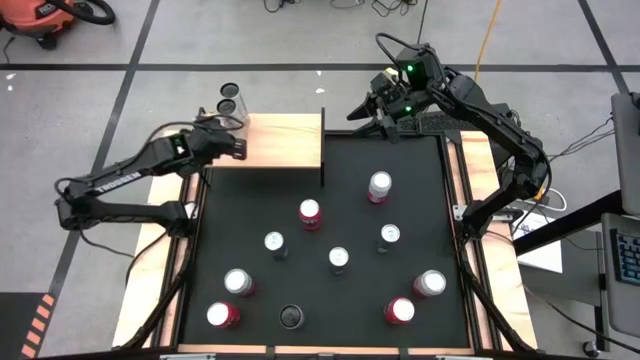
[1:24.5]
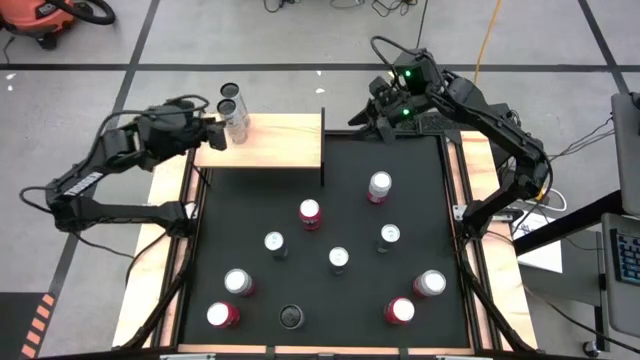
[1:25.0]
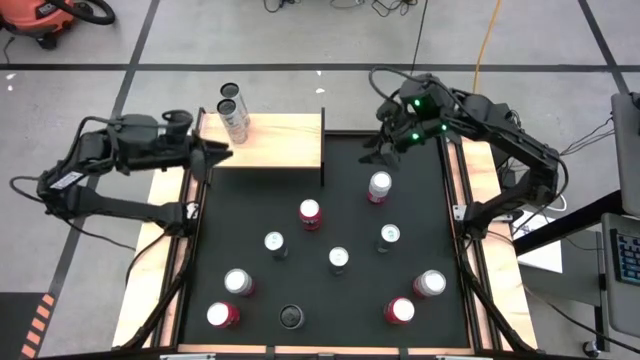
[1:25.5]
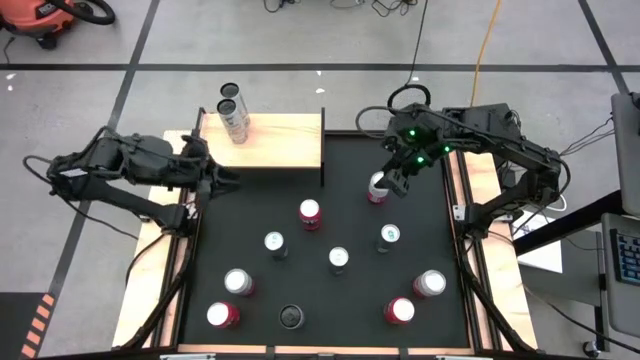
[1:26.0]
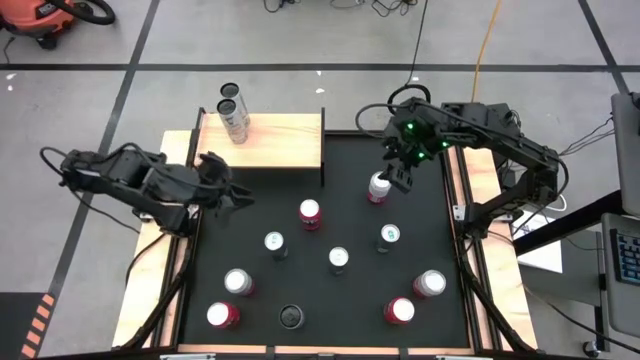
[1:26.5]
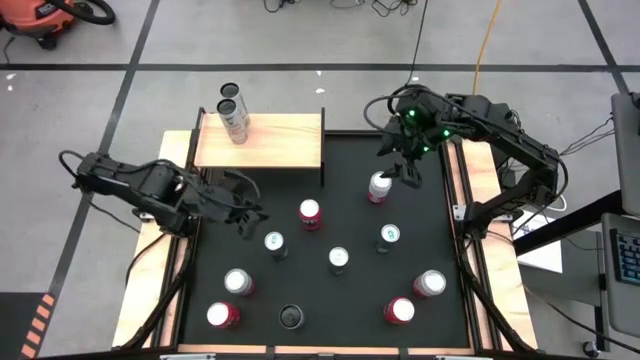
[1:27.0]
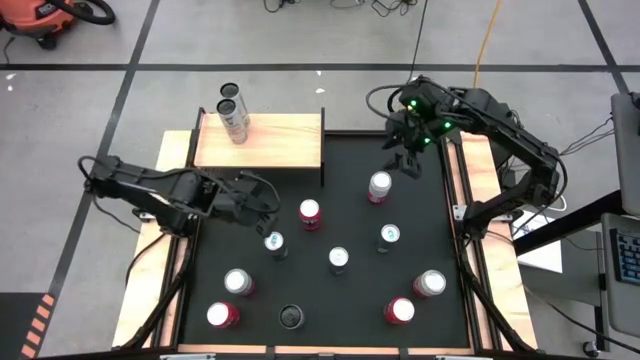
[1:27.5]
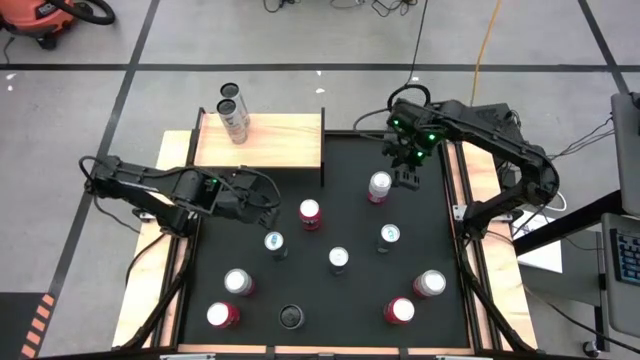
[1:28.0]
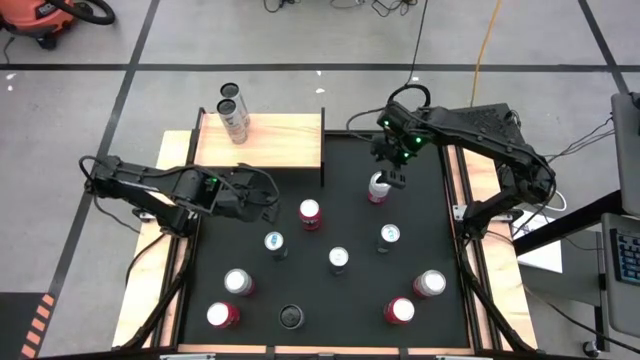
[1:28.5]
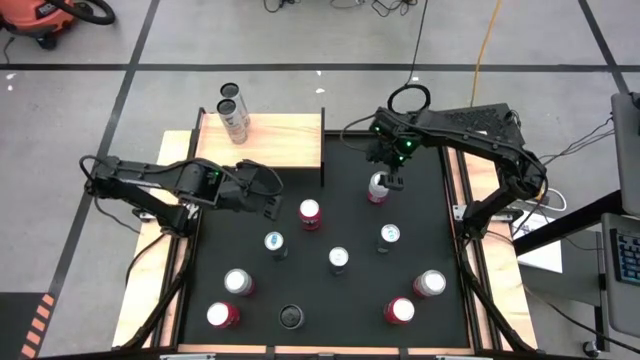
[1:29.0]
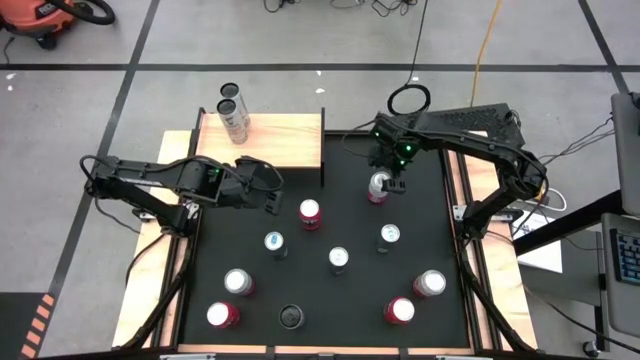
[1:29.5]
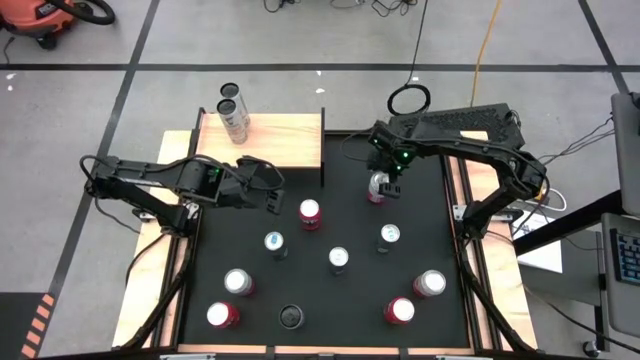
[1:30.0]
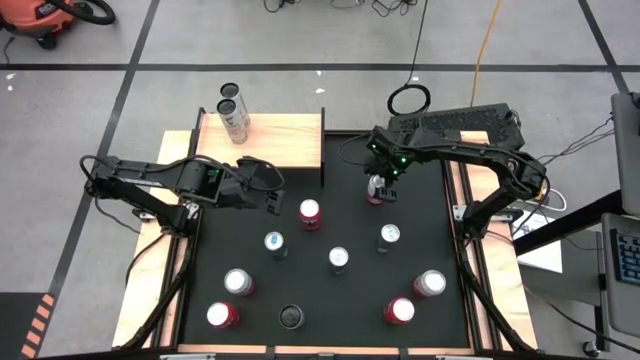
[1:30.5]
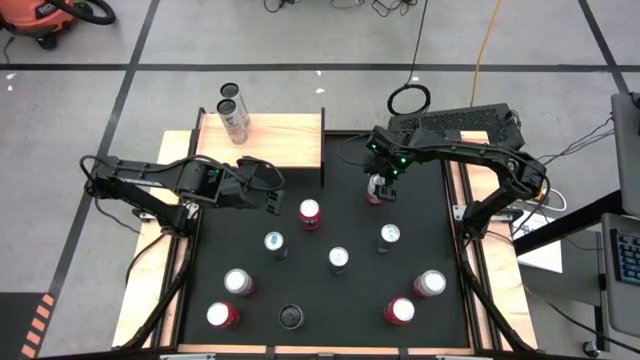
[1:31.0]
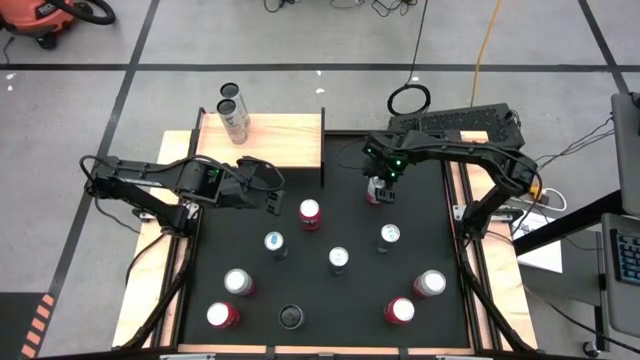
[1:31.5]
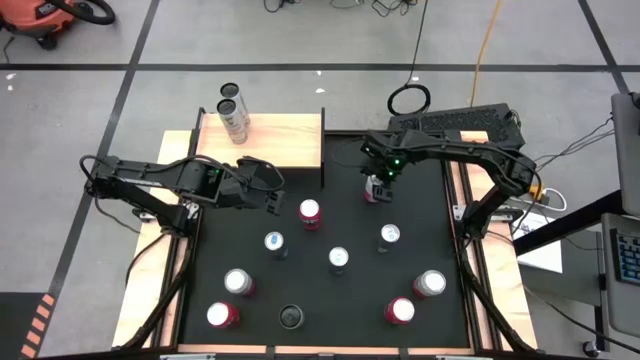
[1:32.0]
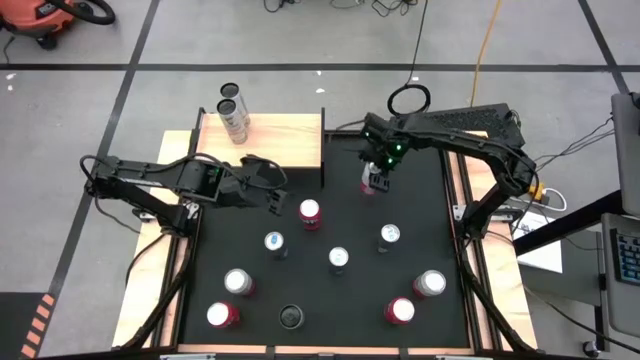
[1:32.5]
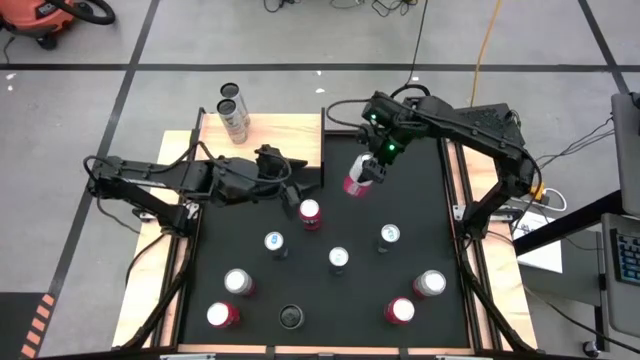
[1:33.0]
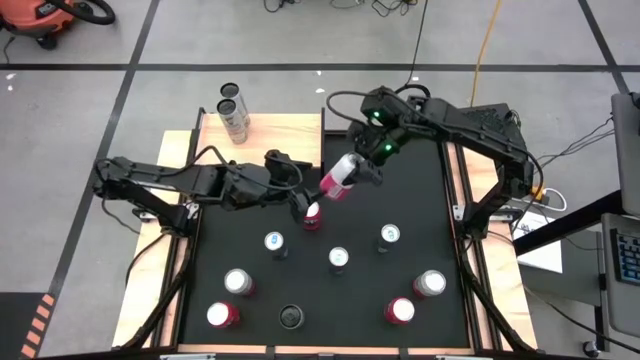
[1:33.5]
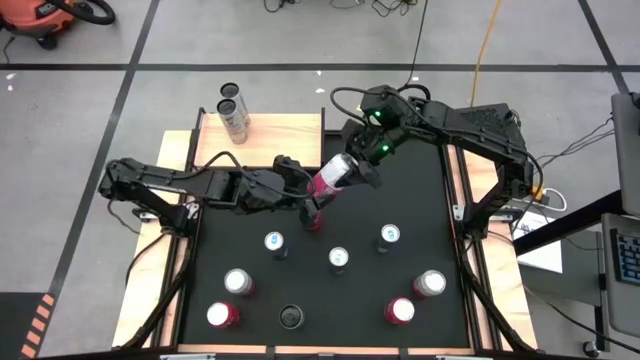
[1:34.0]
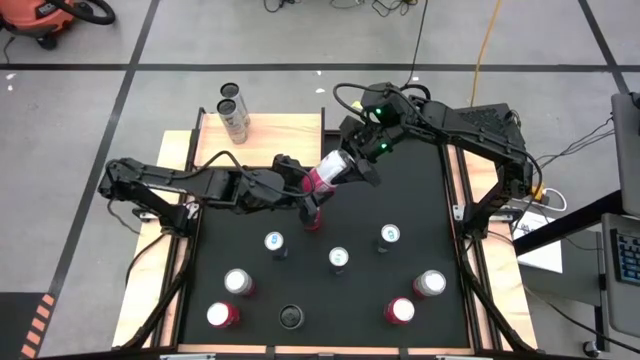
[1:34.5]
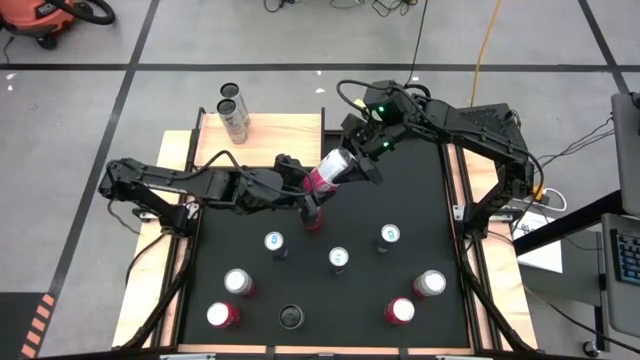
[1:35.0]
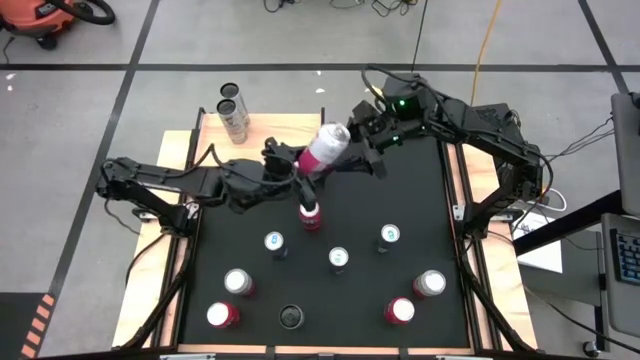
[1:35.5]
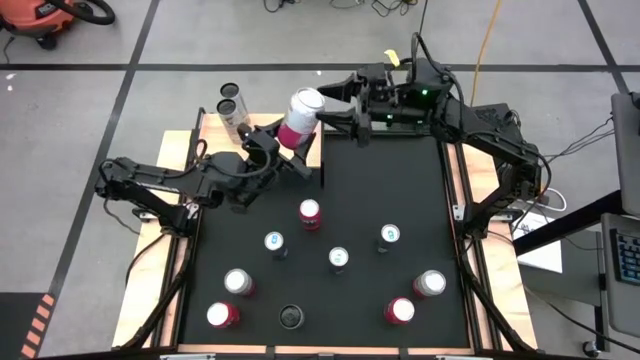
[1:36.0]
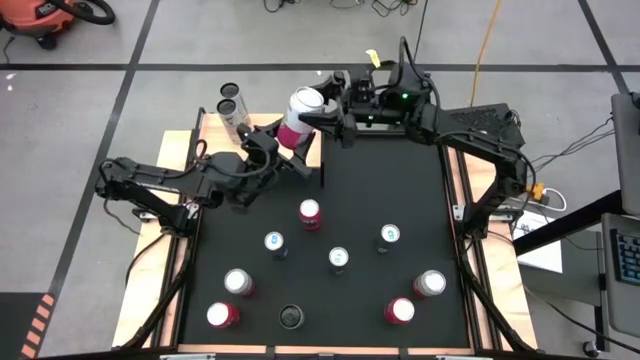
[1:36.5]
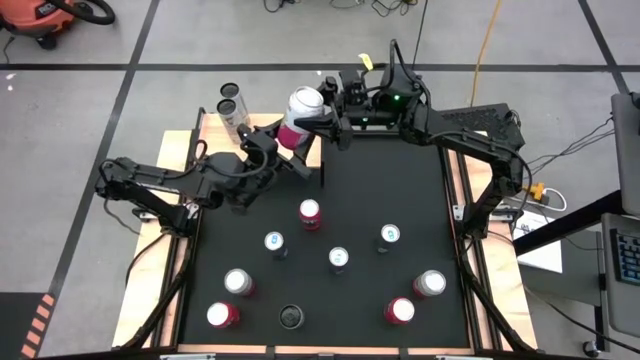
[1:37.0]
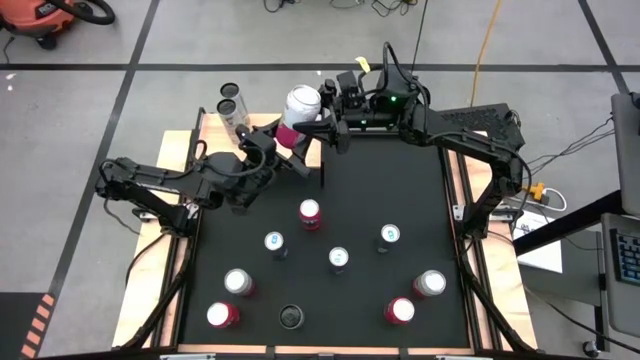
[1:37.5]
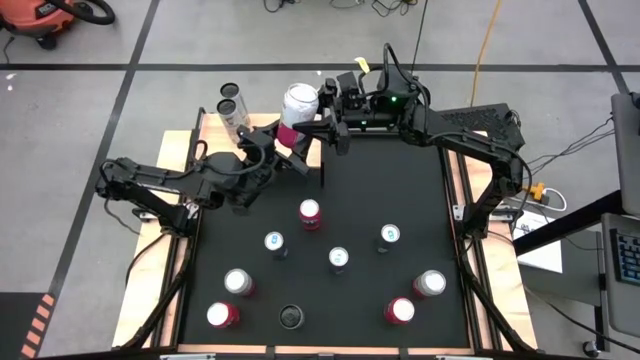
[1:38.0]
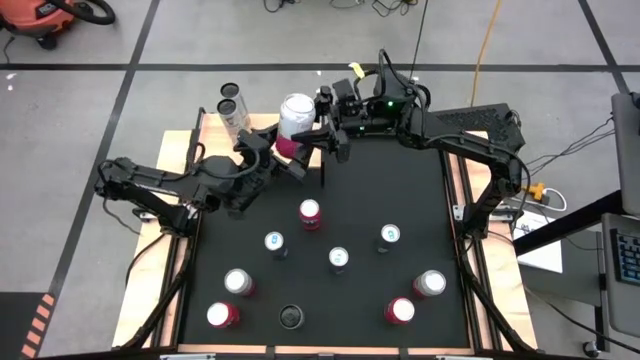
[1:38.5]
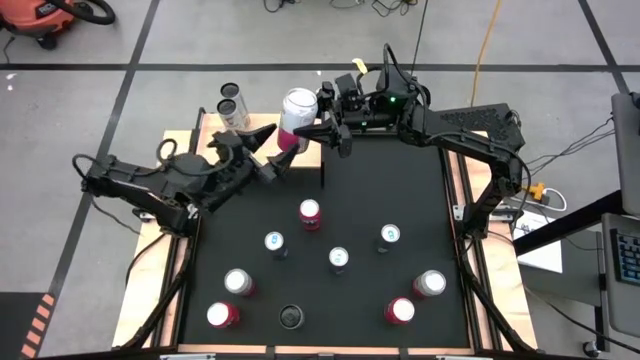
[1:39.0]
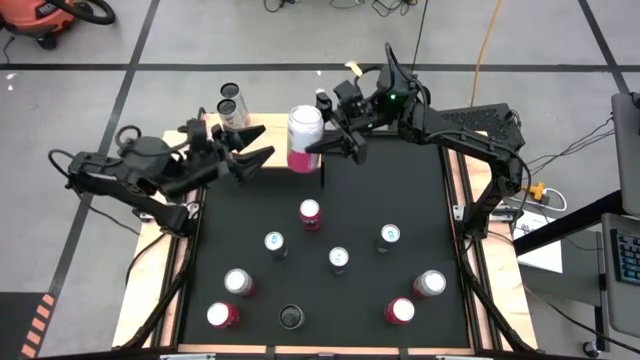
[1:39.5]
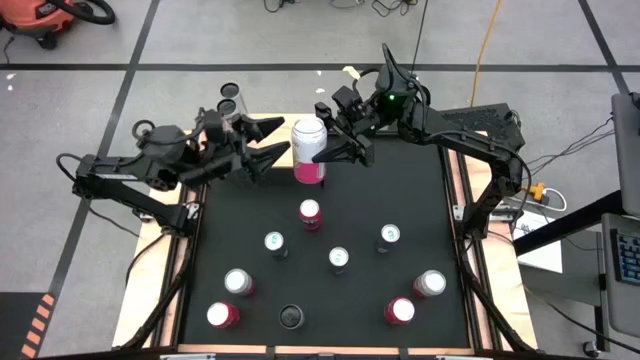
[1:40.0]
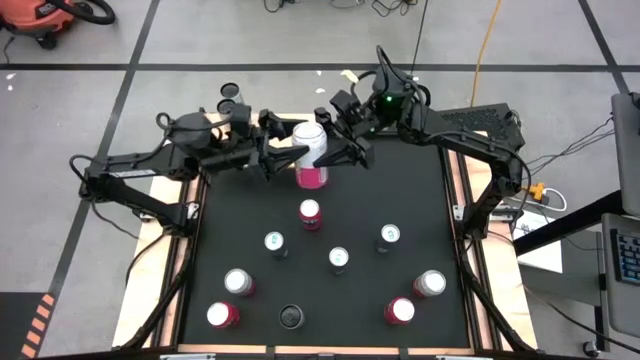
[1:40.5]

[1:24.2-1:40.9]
Task: Place canned beverage on shelf
Put the top pink soda can on the shelf

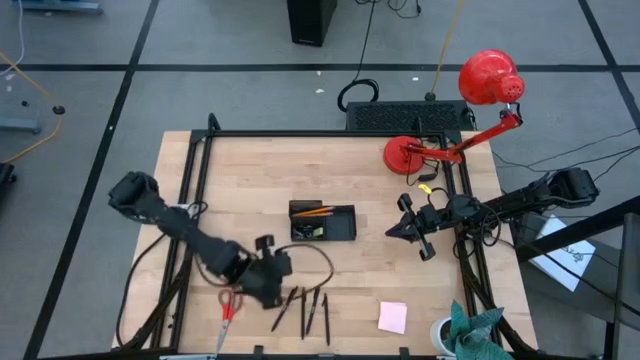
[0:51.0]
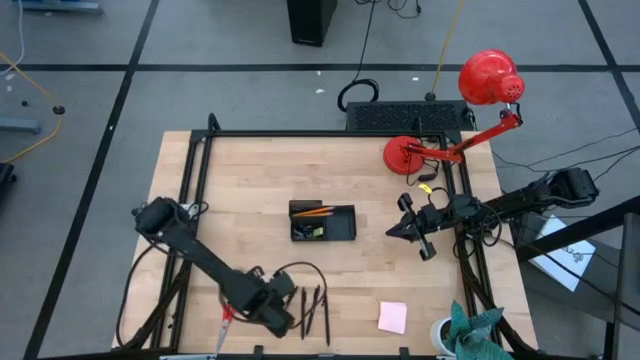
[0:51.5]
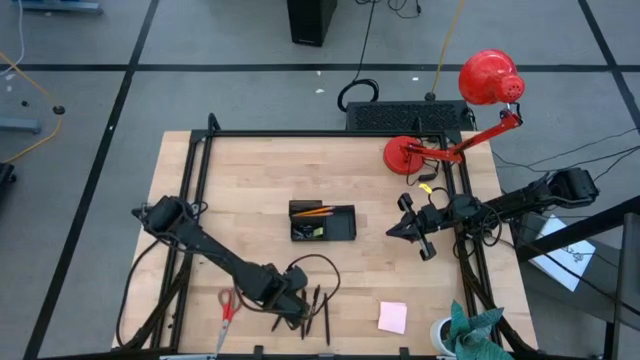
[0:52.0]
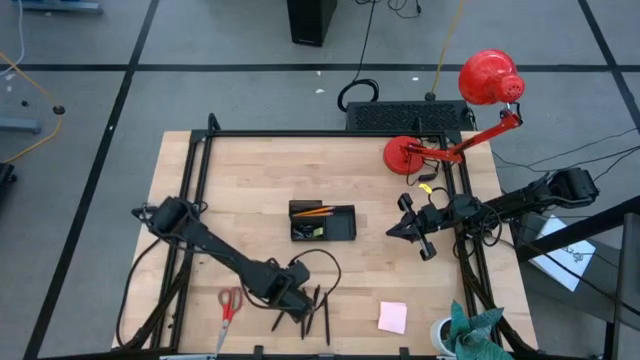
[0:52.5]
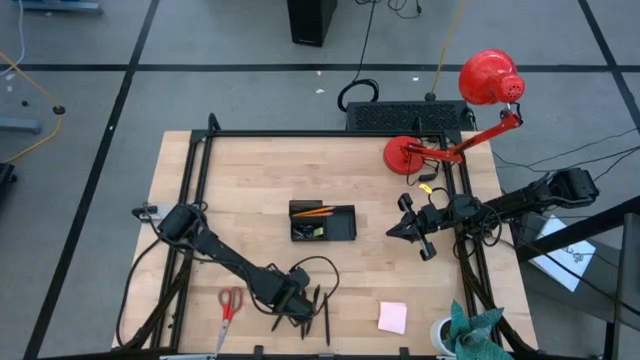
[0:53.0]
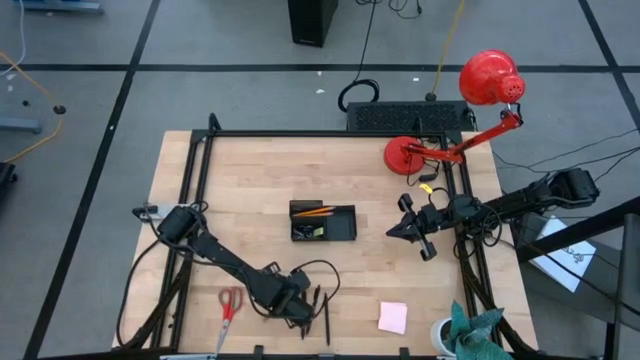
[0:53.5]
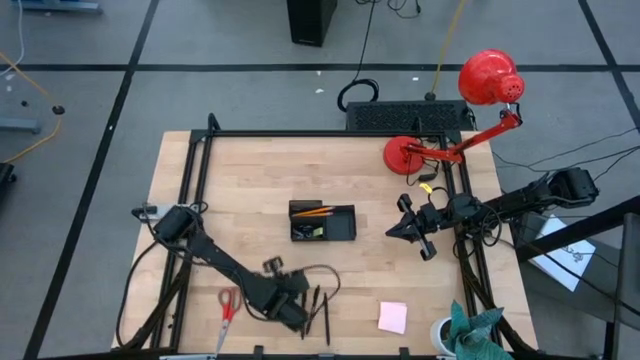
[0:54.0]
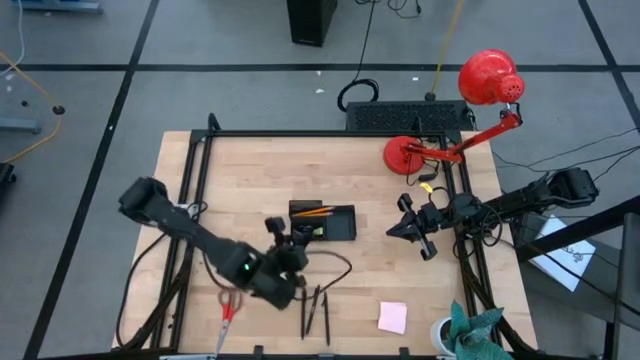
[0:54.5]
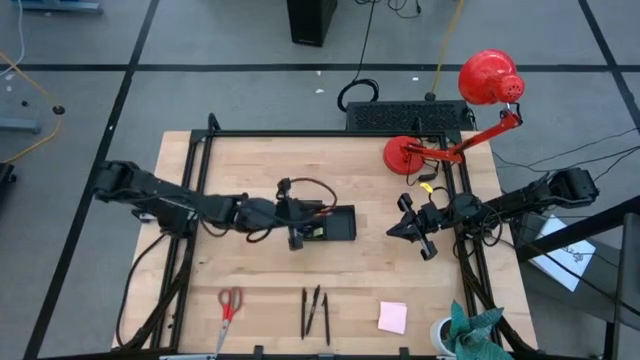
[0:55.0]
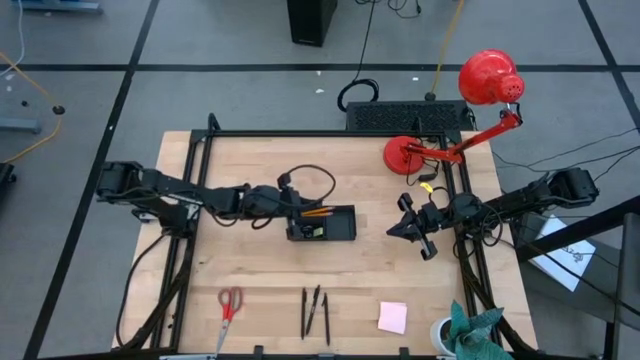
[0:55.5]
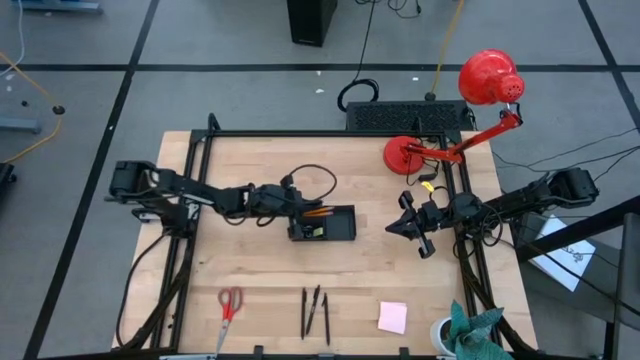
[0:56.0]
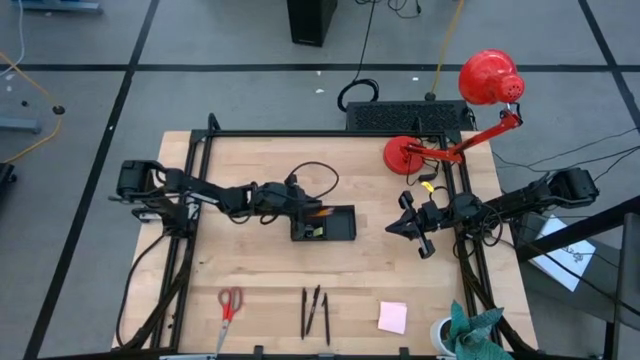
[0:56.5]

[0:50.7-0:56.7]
Task: Pick and place office supplies into organizer
Put the black pen into the desk organizer
